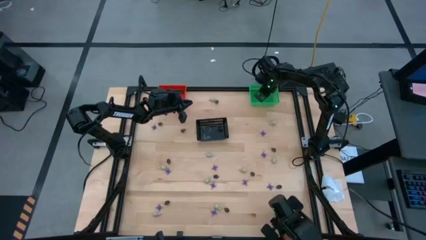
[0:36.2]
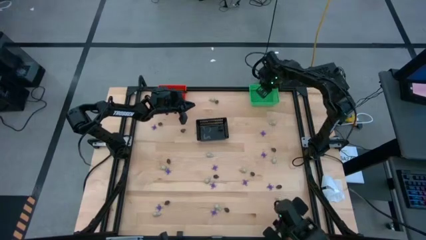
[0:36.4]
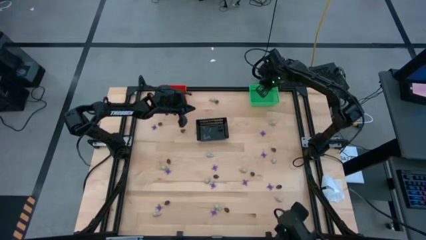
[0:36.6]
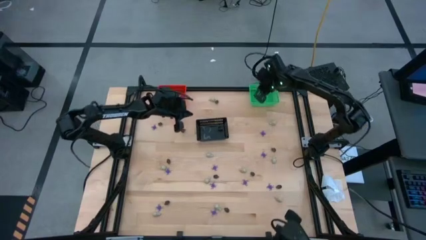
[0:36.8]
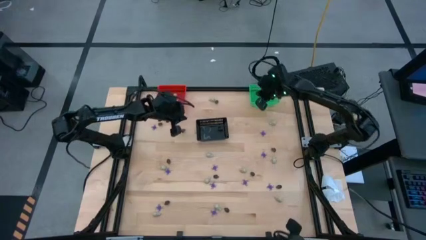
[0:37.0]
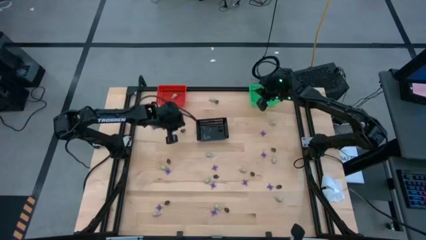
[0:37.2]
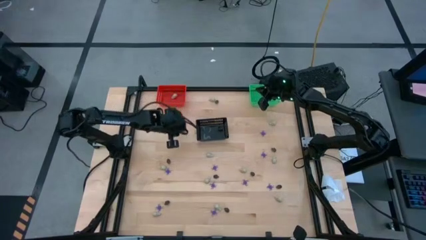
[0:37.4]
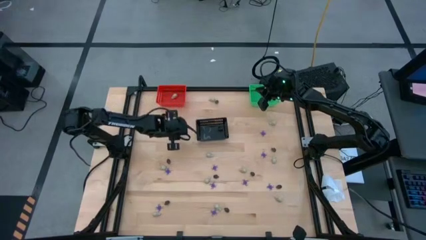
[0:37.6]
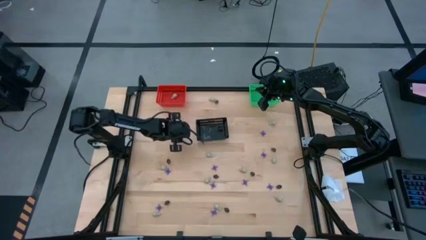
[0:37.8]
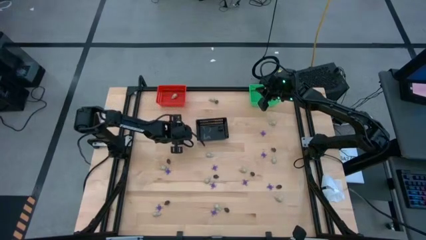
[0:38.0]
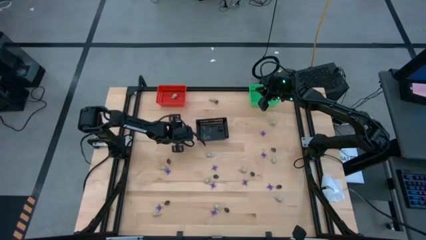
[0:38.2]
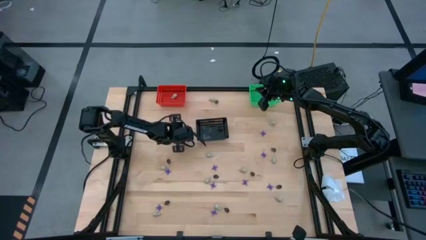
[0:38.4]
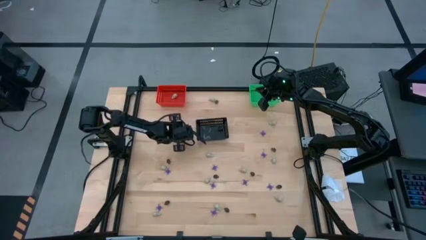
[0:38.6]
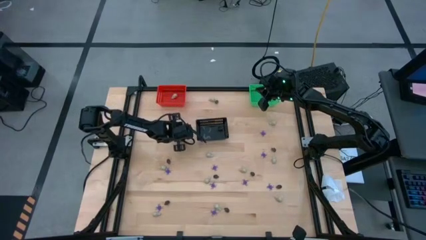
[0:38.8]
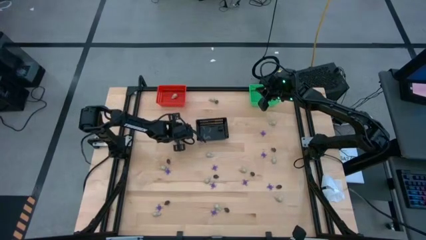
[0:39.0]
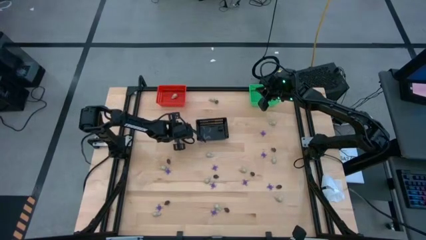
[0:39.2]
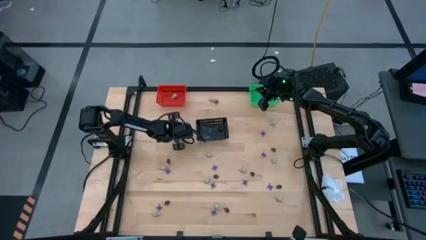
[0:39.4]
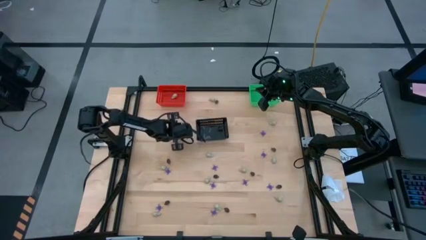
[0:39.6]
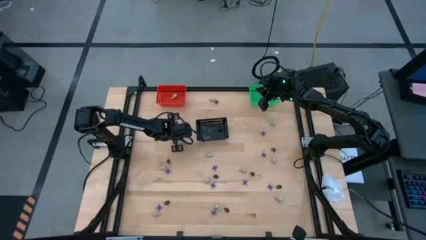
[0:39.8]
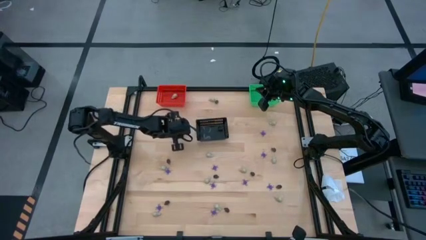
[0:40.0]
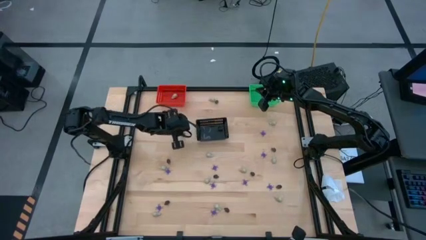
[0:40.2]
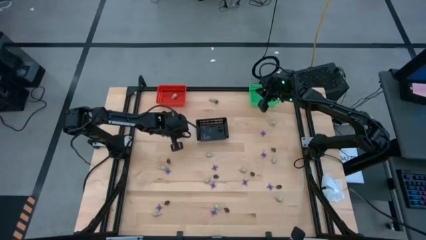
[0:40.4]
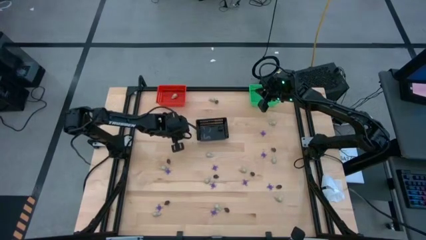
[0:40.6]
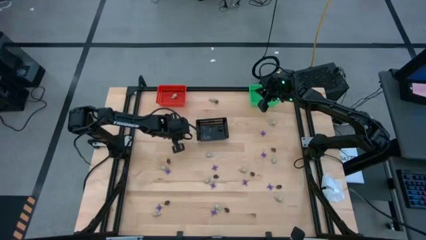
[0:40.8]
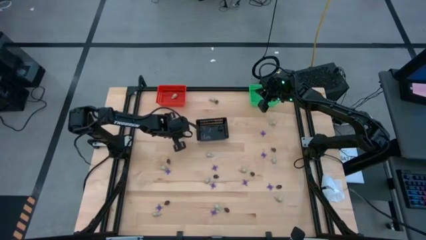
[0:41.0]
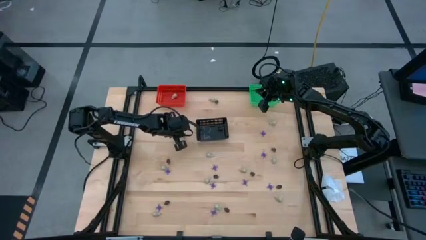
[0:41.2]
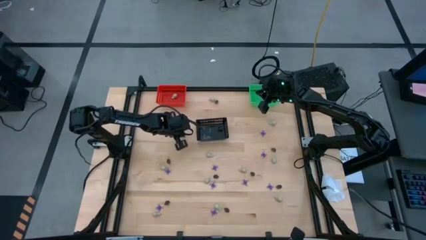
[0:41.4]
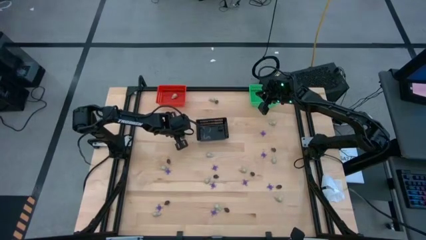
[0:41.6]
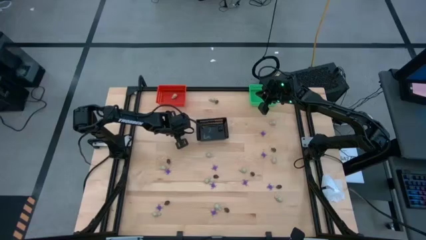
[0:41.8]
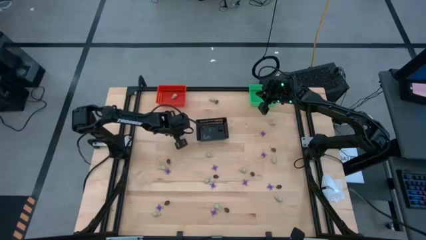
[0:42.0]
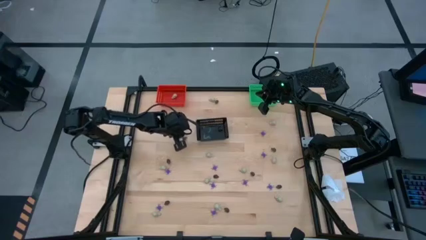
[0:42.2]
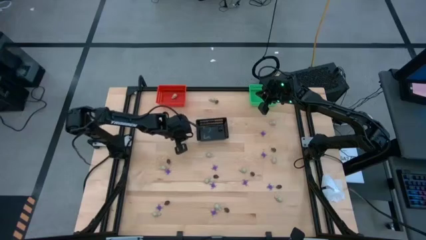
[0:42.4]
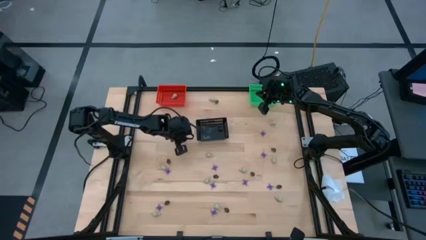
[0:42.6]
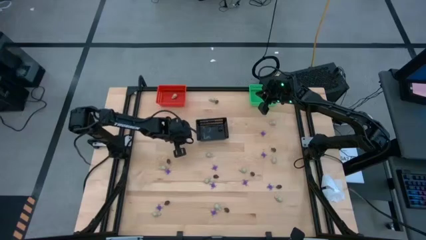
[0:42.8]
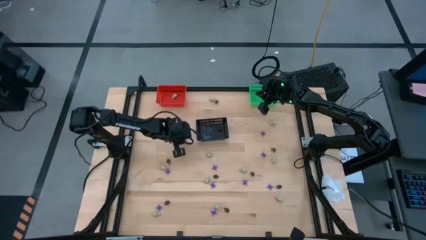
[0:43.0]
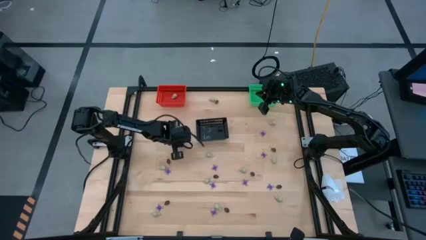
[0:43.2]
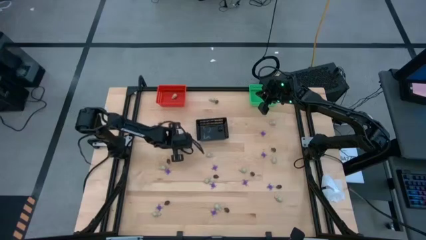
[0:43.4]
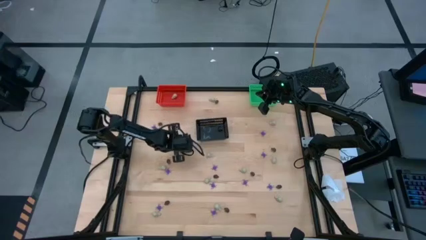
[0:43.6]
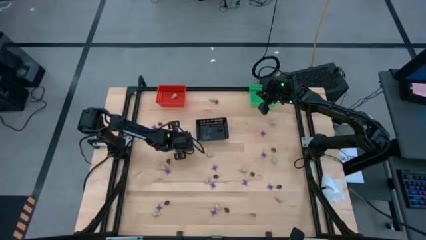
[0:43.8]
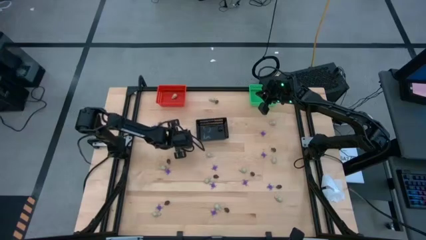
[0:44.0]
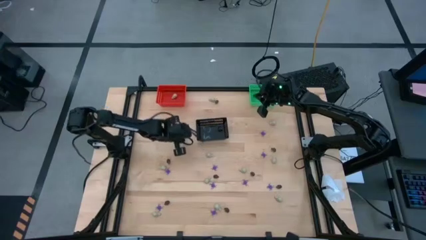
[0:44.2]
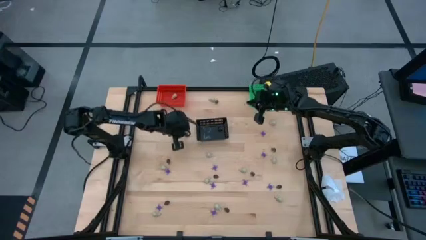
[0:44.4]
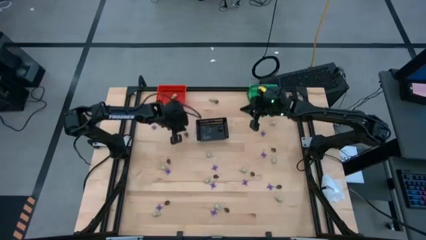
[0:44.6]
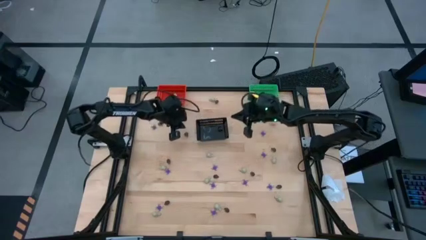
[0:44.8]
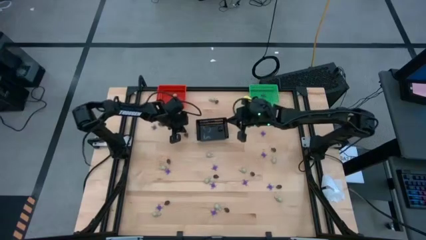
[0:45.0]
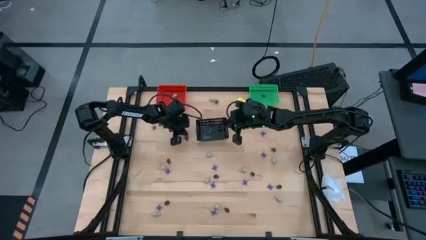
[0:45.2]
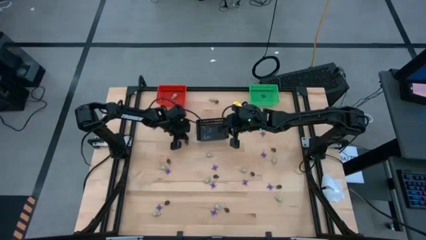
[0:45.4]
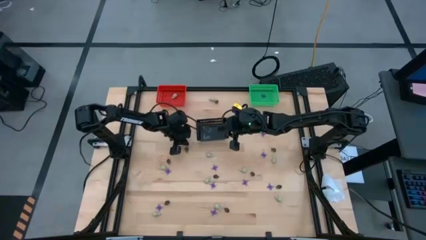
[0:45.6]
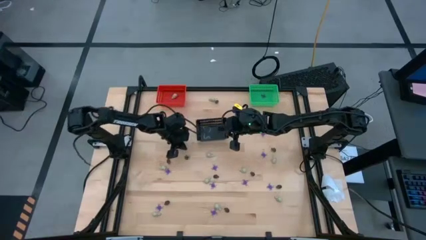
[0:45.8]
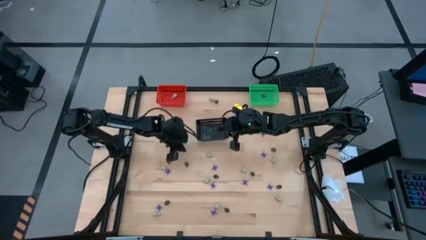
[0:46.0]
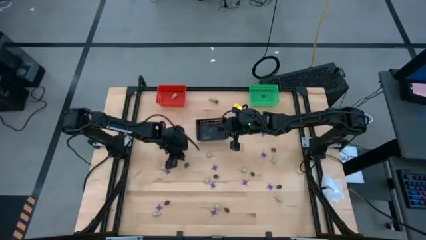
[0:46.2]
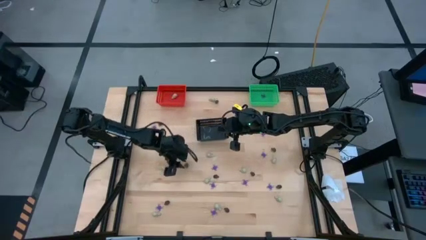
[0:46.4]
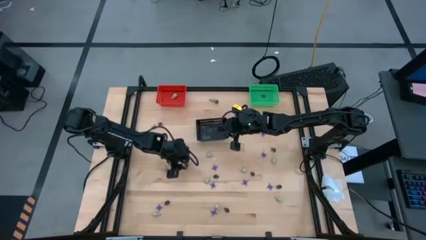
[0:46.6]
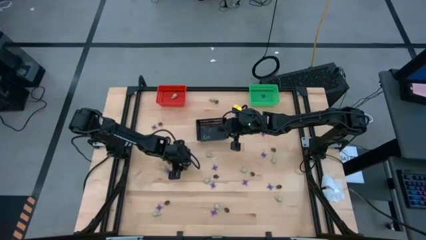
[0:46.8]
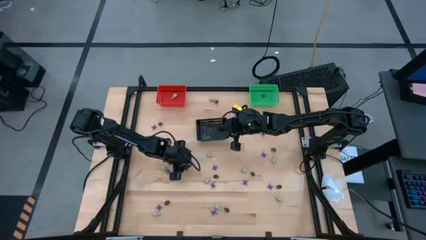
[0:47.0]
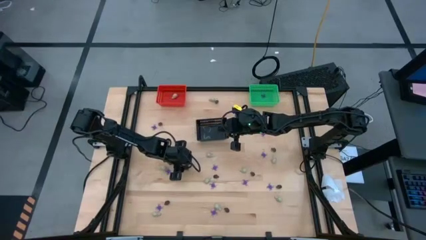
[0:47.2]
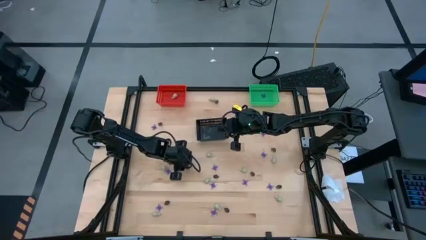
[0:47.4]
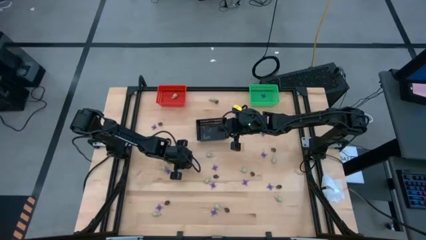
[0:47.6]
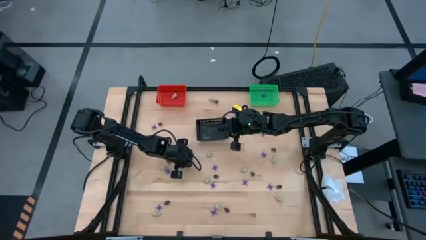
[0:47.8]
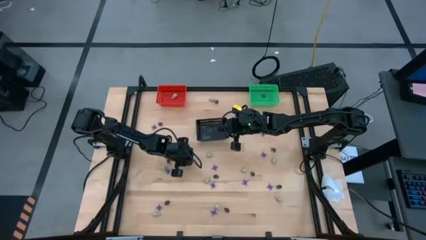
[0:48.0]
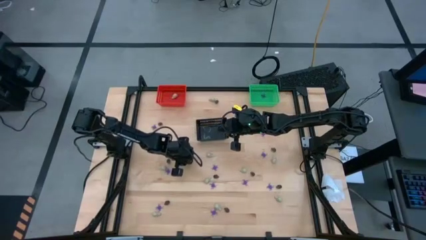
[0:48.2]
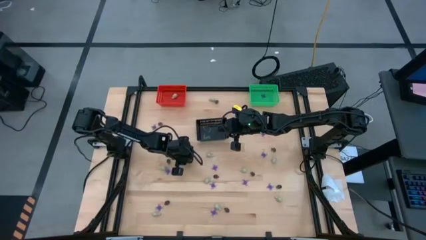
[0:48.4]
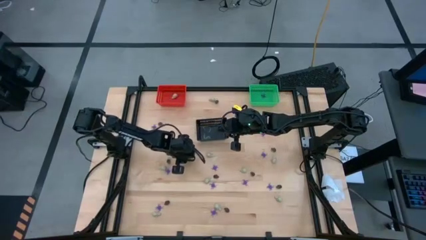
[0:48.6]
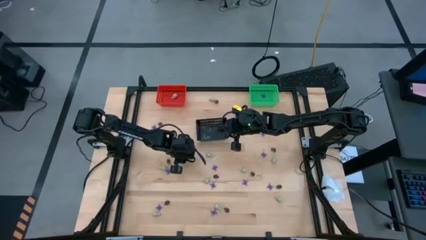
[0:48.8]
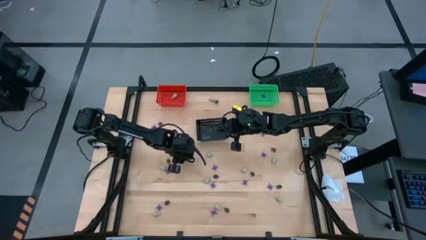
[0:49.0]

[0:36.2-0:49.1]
Task: Sort Halloween decoration
Put the black skull toy into the black bin

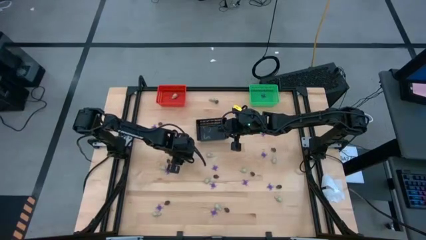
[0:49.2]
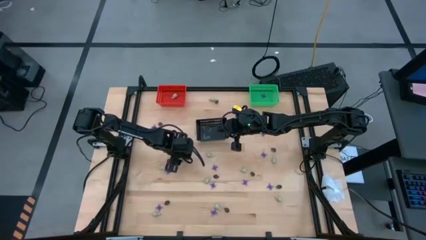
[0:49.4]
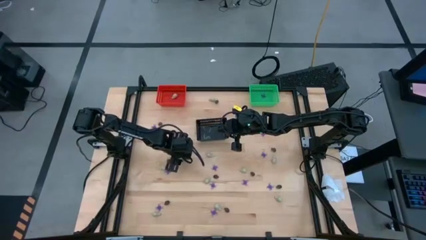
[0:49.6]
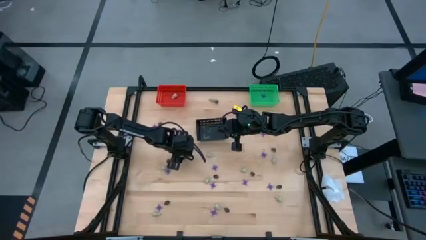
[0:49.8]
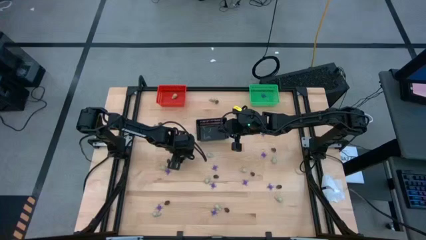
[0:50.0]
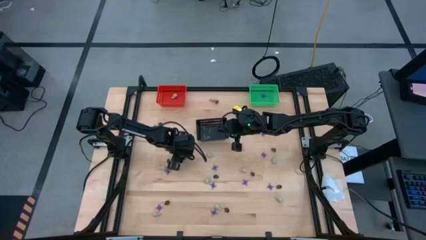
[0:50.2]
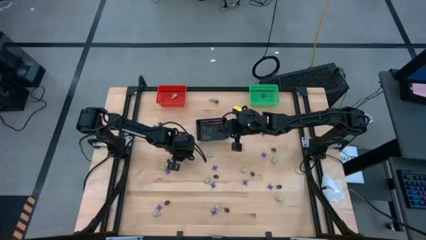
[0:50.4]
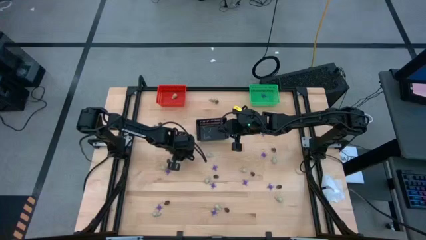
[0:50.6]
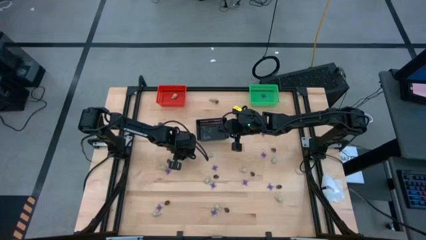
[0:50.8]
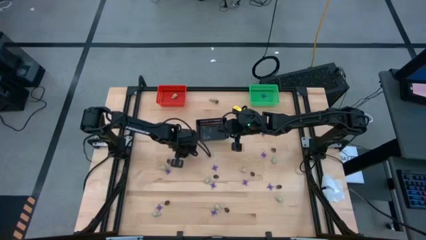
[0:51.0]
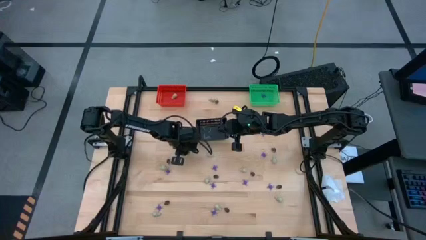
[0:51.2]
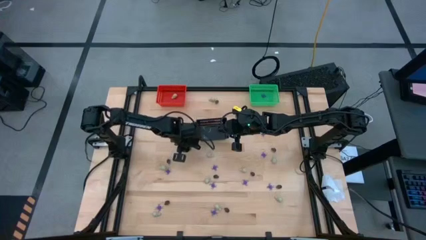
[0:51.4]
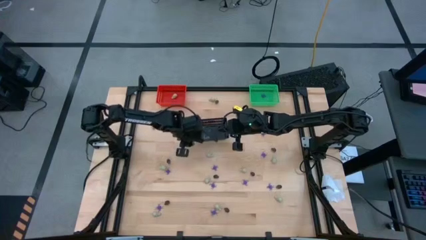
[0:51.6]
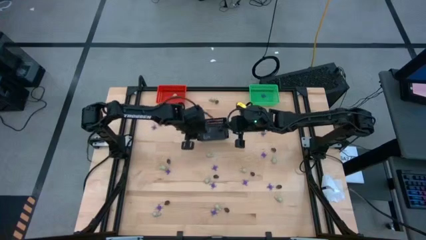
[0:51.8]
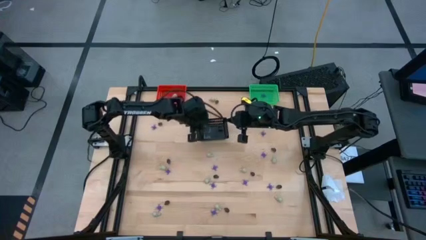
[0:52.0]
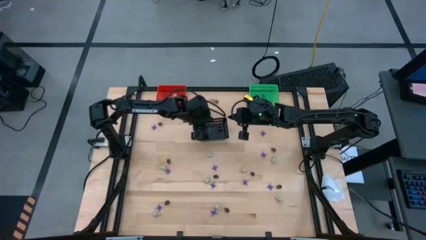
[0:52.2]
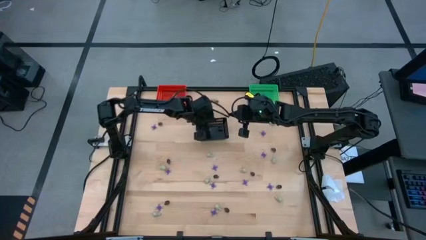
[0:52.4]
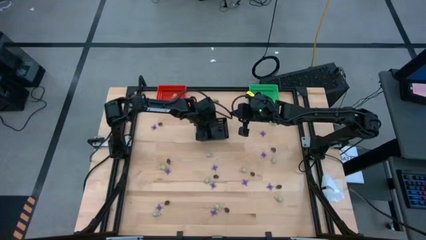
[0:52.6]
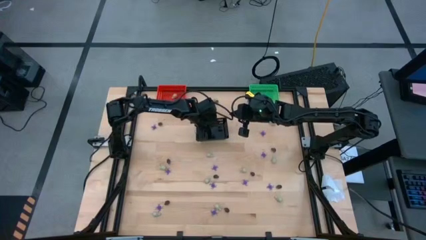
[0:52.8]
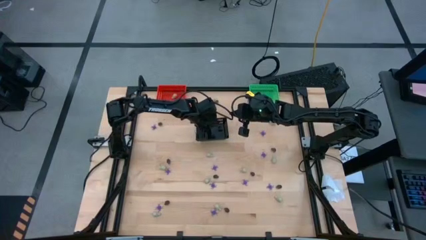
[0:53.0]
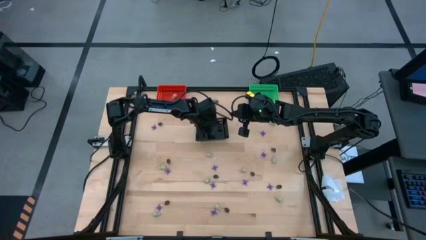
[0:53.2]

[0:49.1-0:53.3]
Put the black skull toy into the black bin
